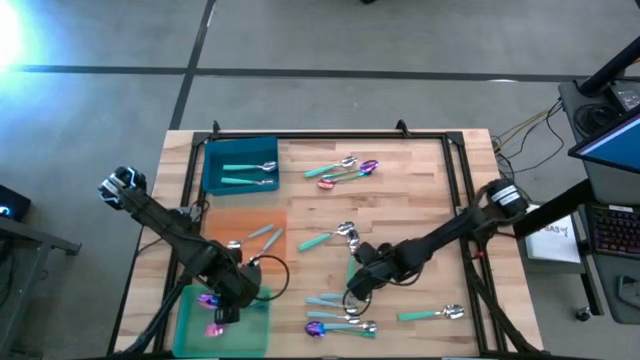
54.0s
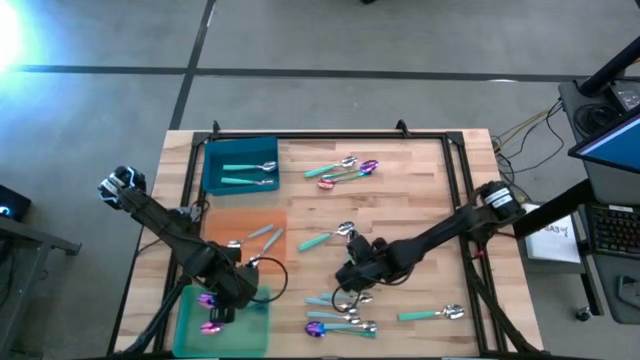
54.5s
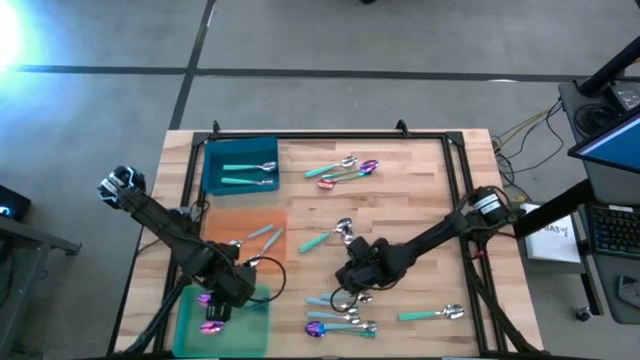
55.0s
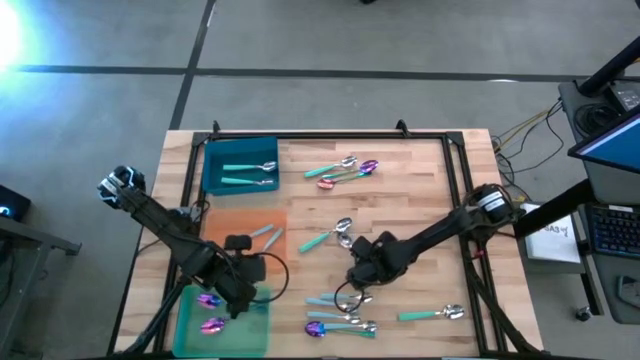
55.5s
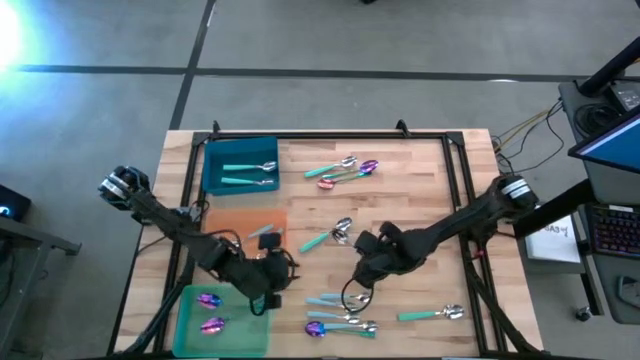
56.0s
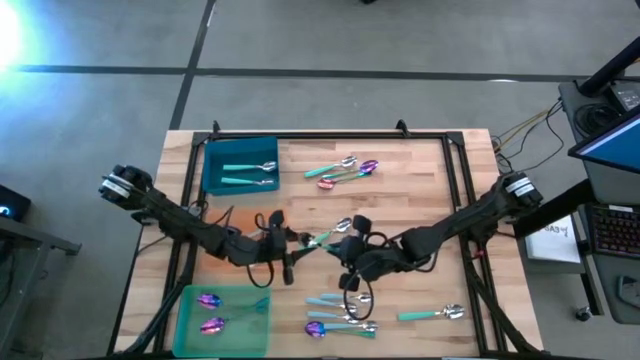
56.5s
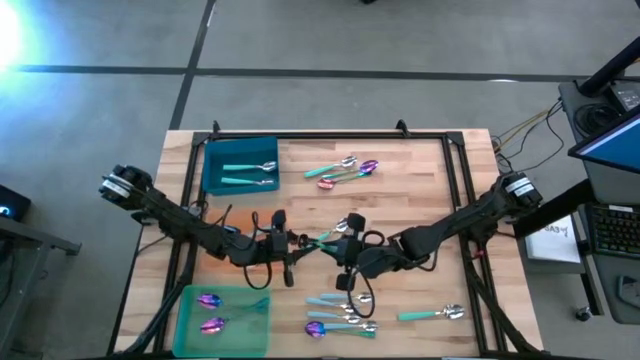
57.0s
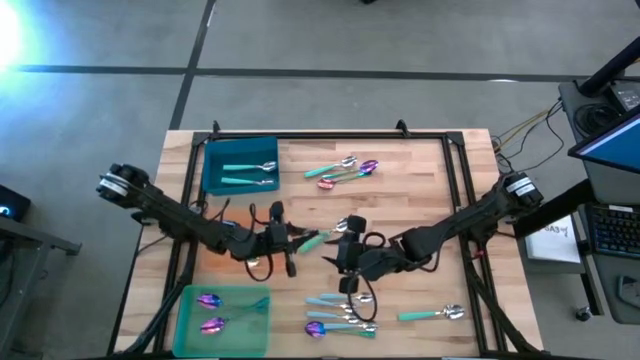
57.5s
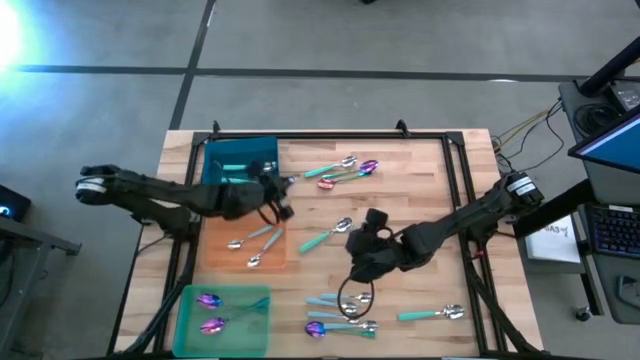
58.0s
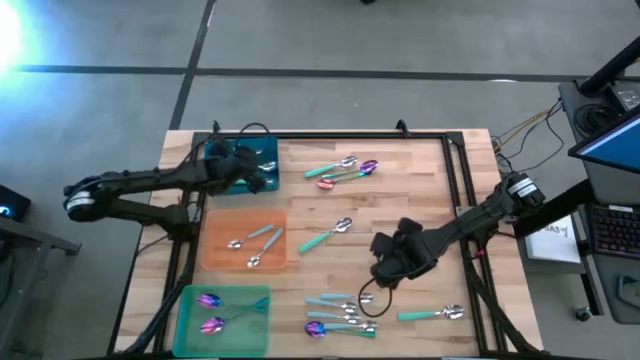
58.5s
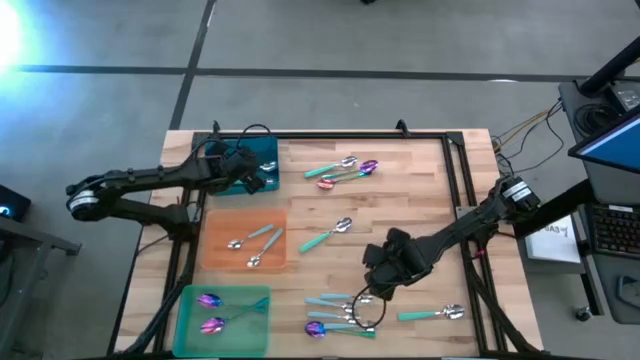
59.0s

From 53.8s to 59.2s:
Task: Sort silverware by color (type)
Put the green spoon into the blue bin

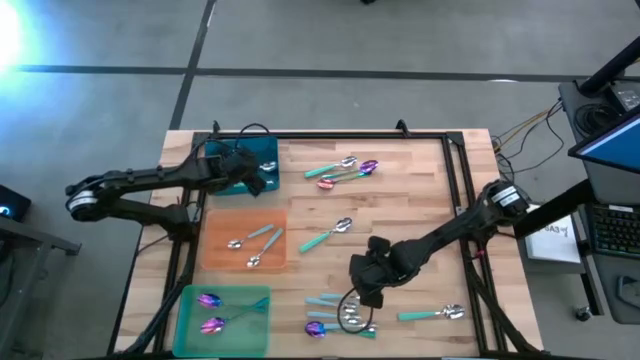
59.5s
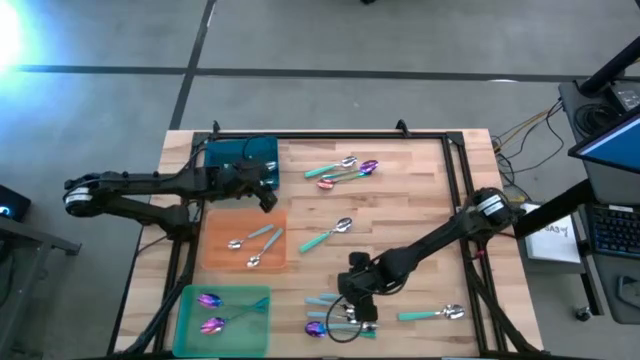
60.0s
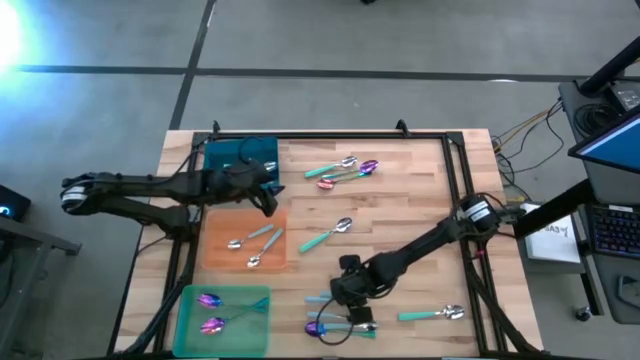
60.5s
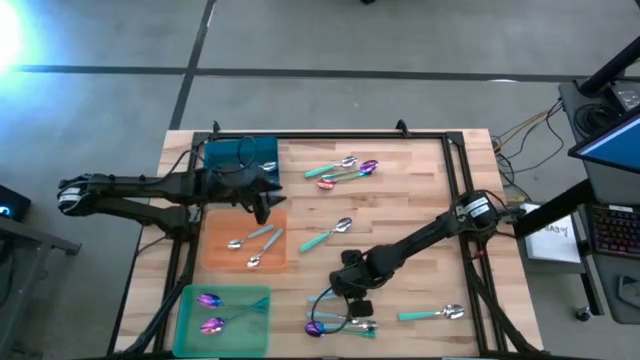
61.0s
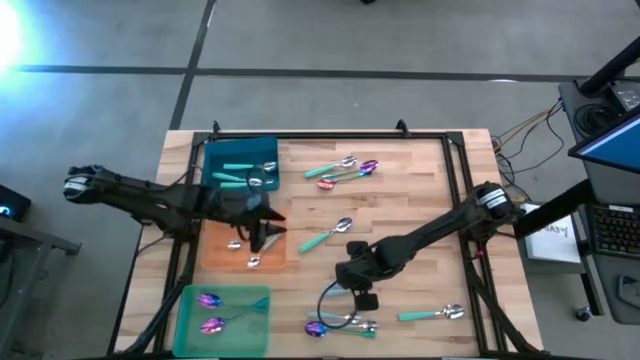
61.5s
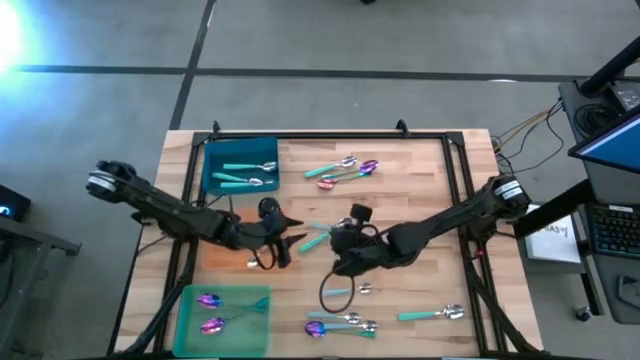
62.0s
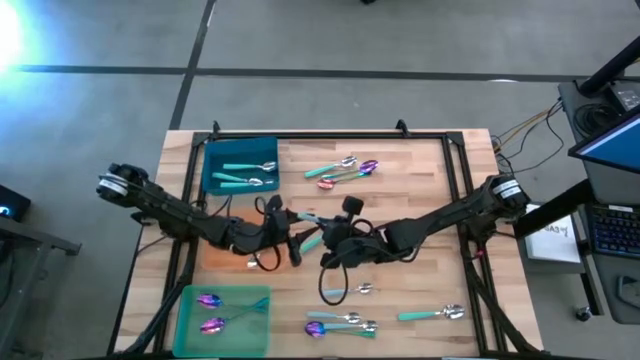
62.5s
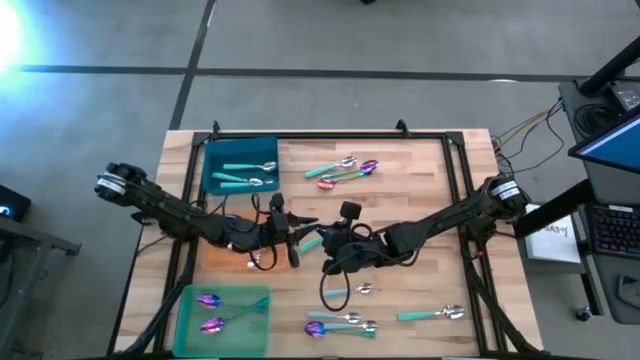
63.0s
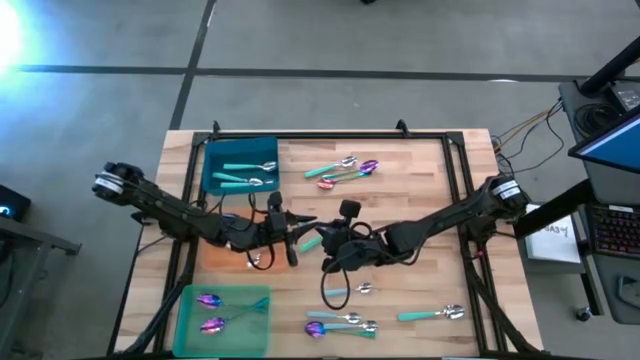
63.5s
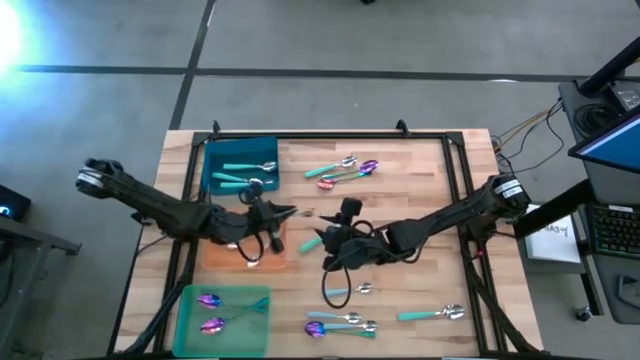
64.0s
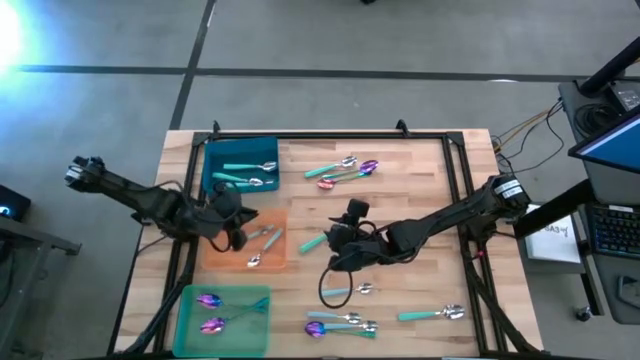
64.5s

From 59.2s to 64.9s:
Put the blue spoon into the orange bin

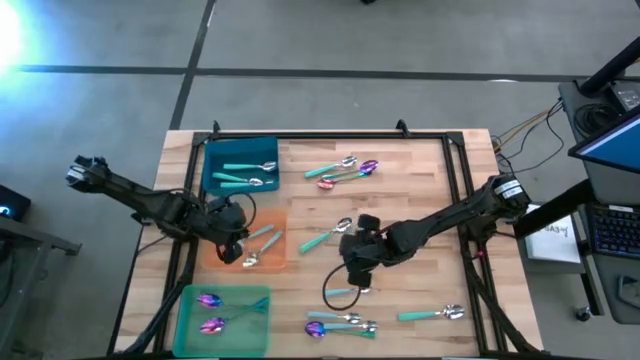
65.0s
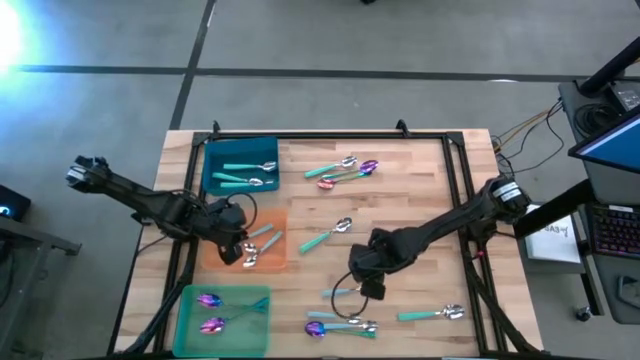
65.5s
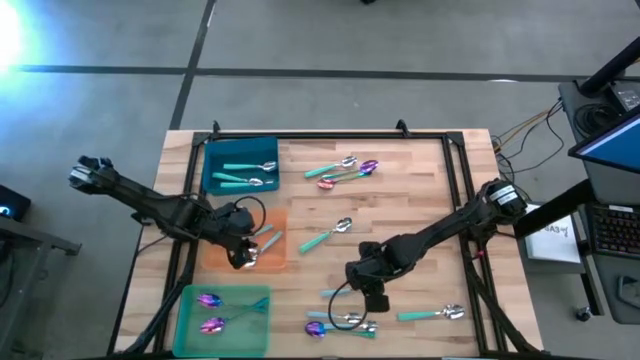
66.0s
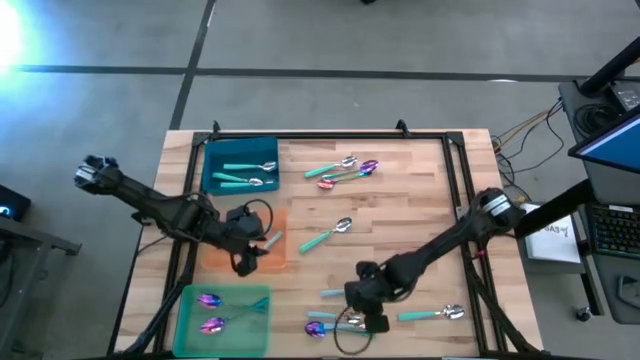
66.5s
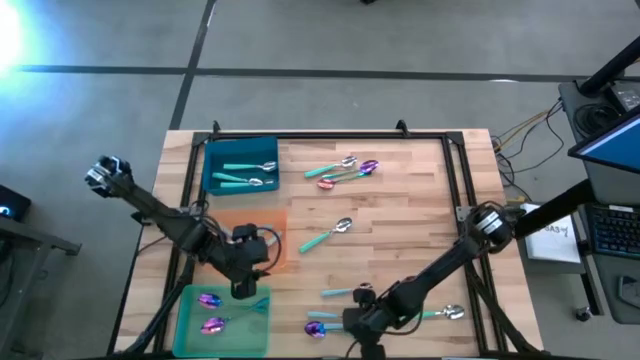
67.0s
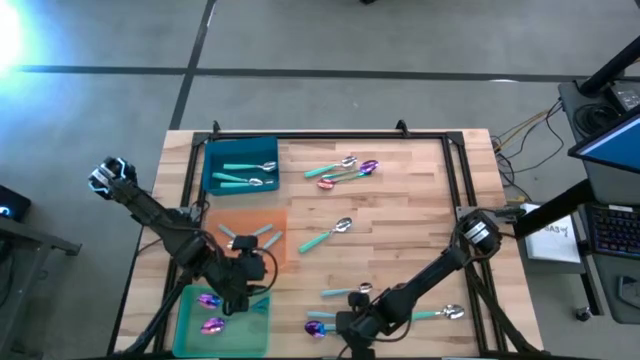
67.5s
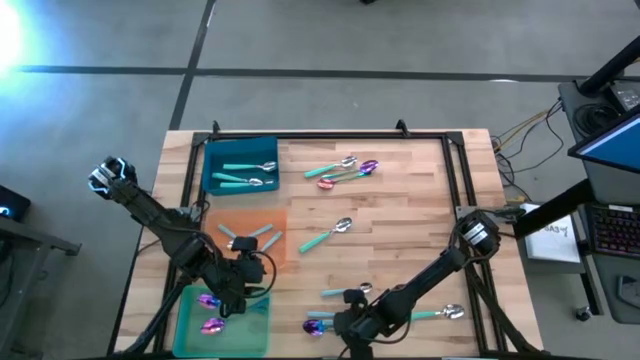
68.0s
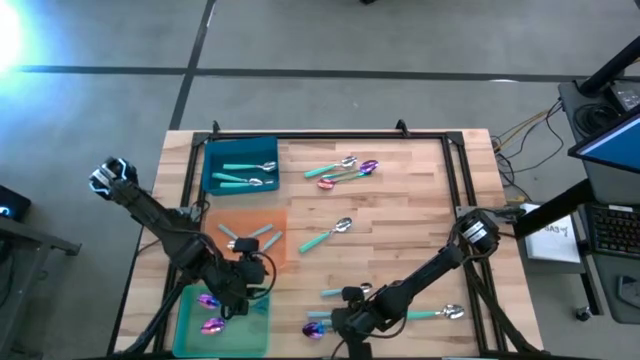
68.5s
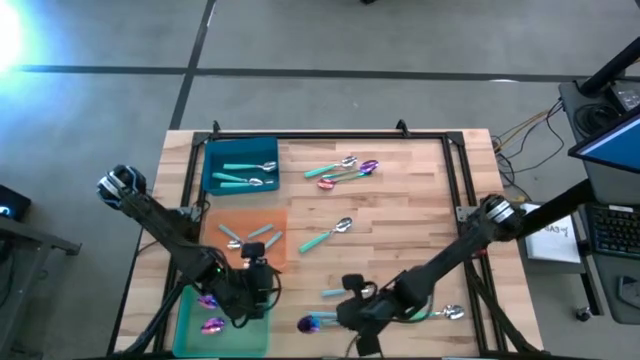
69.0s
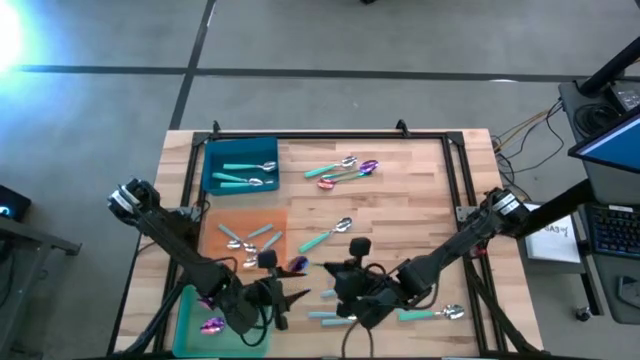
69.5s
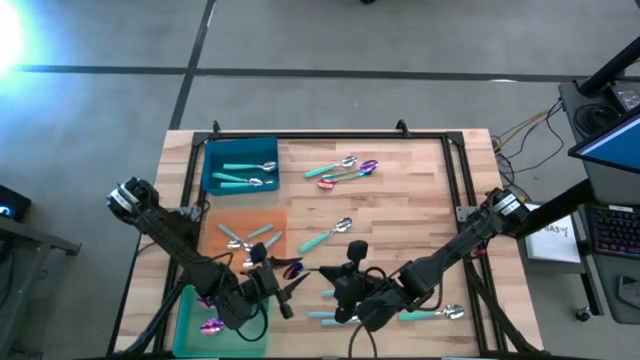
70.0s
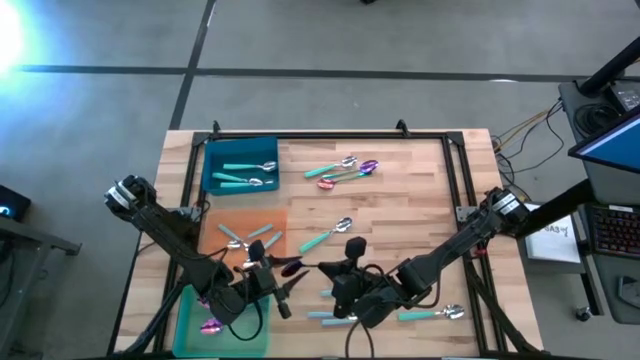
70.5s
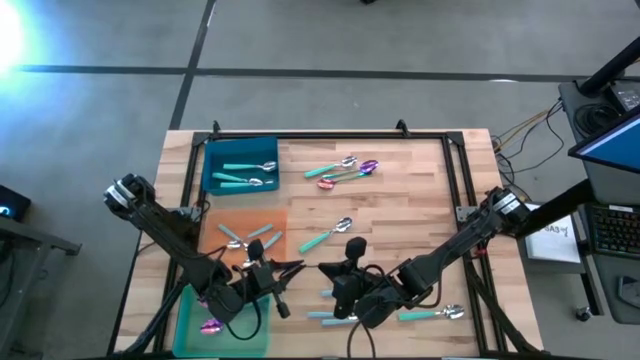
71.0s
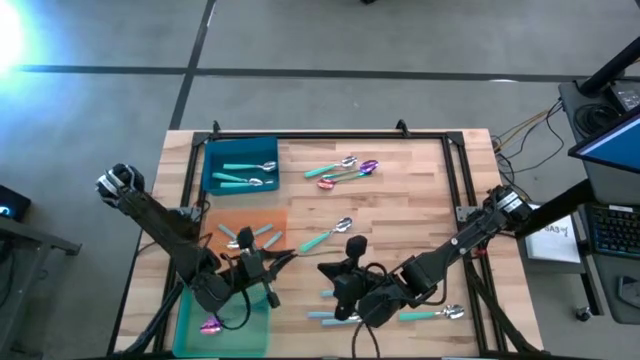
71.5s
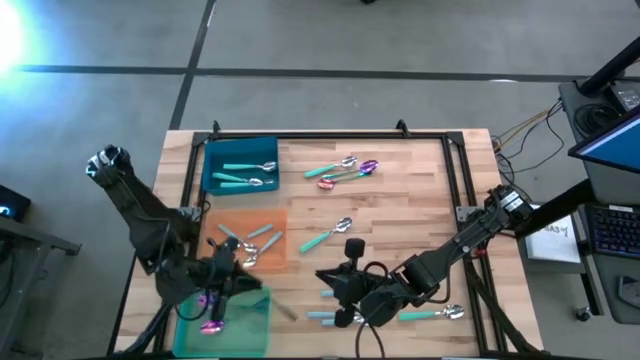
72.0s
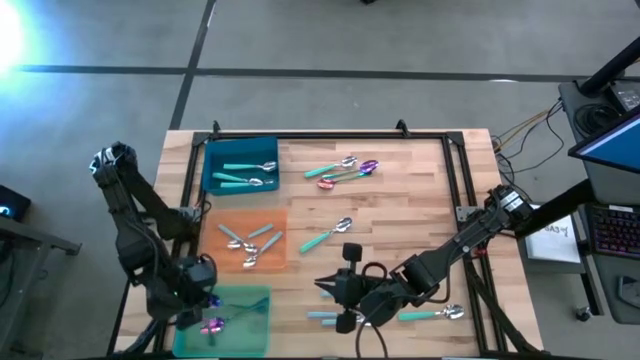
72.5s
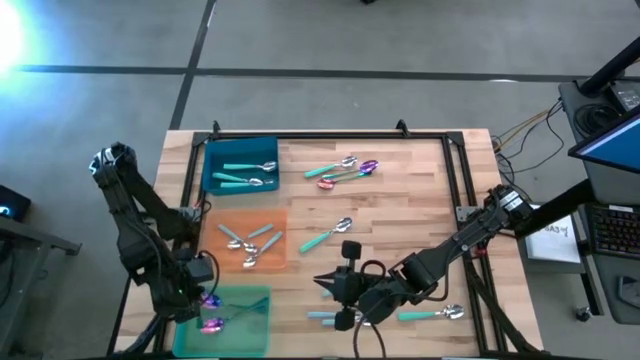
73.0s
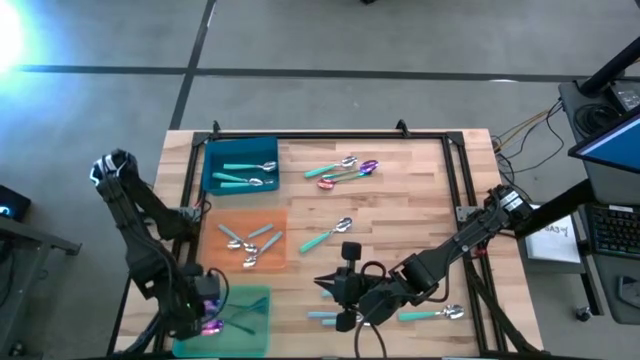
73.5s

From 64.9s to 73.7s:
Put the violet spoon into the green bin

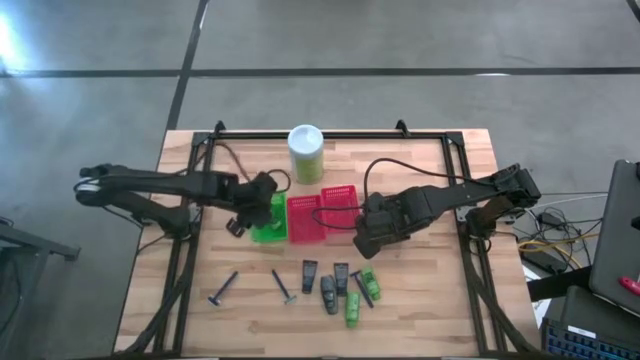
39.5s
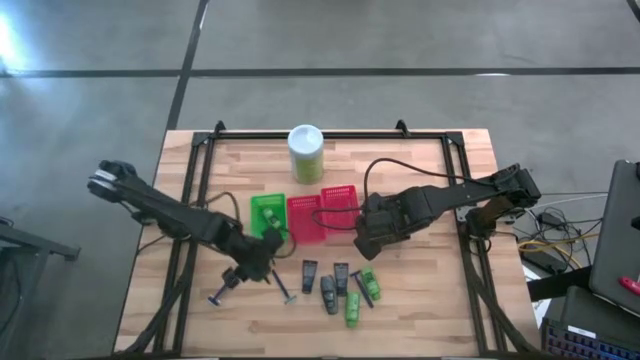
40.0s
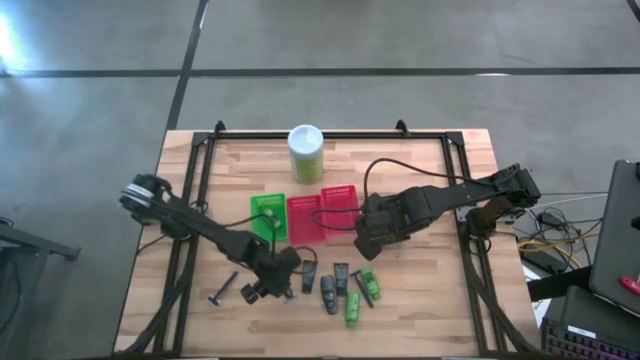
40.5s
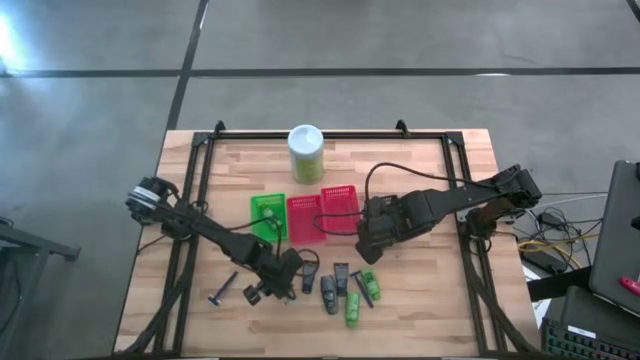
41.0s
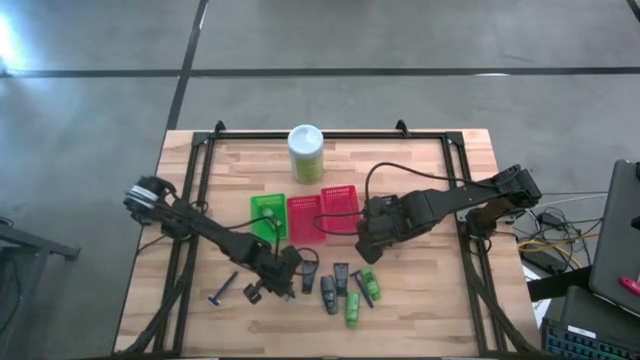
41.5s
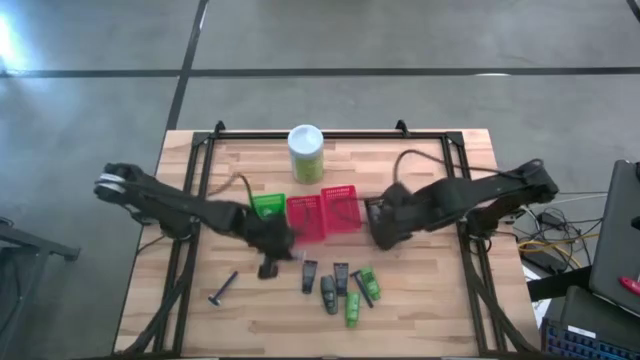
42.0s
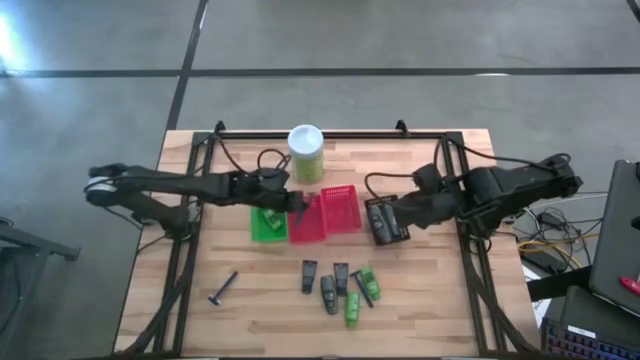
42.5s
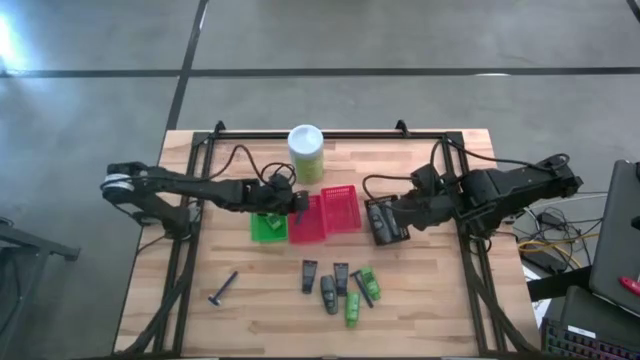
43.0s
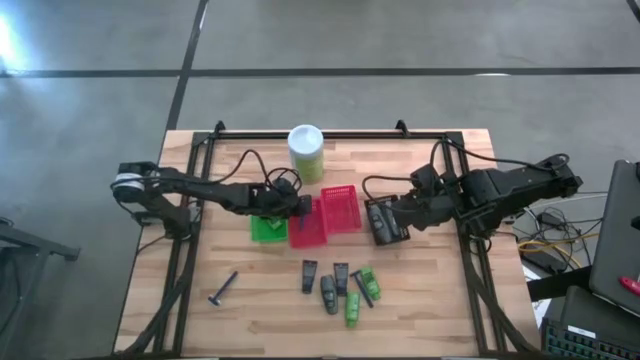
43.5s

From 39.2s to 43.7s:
Task: Pick & Place Travel size toiletries
Put the blue razor into the left orange bin
